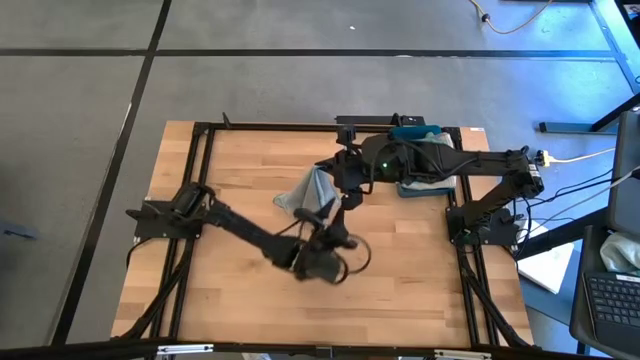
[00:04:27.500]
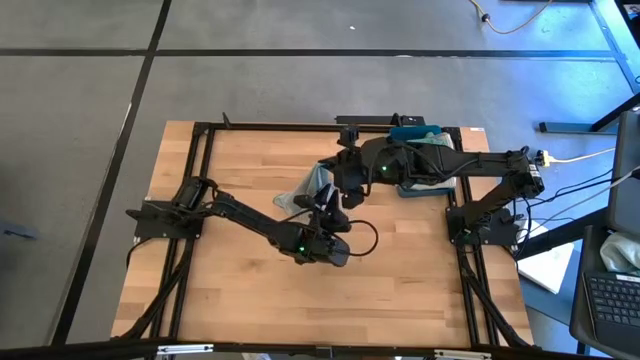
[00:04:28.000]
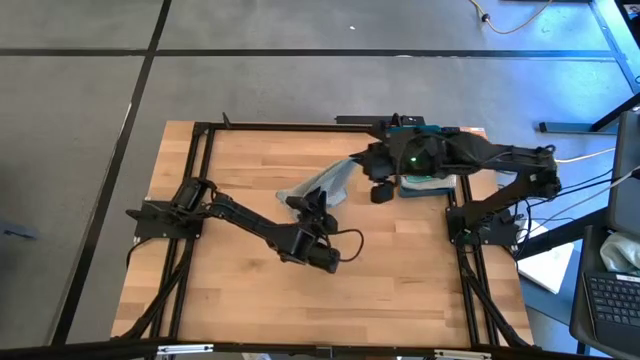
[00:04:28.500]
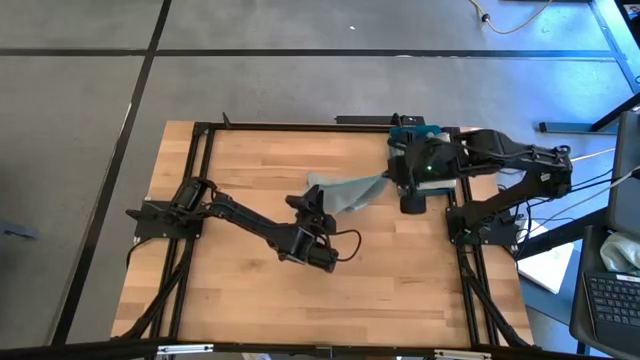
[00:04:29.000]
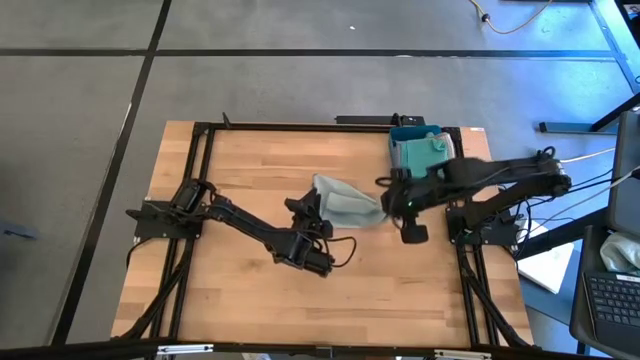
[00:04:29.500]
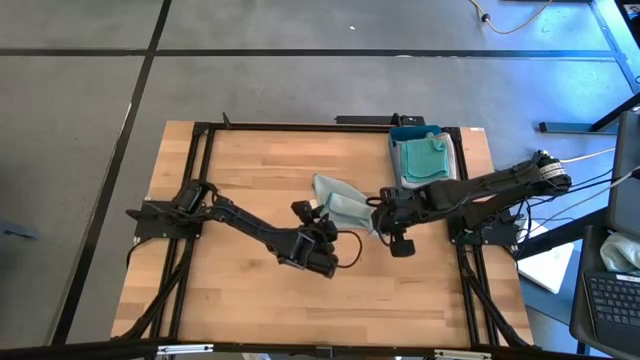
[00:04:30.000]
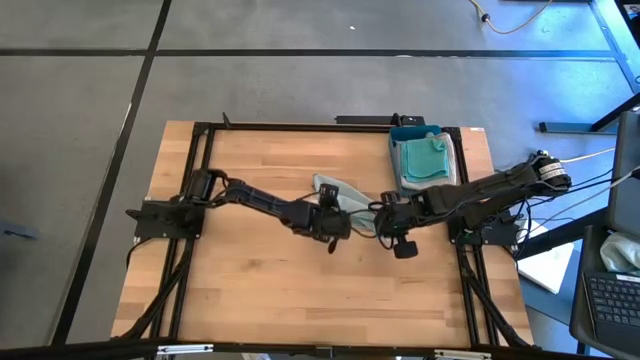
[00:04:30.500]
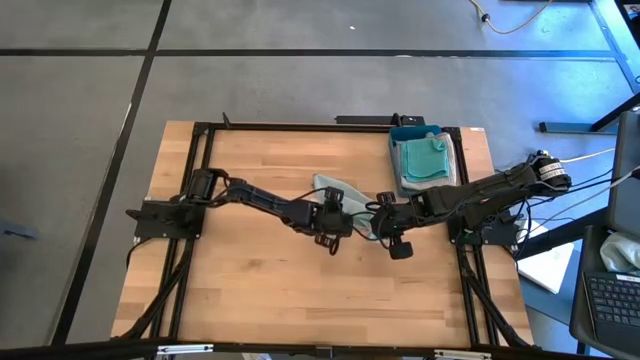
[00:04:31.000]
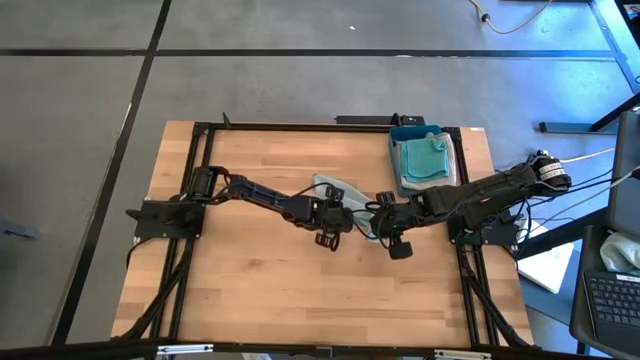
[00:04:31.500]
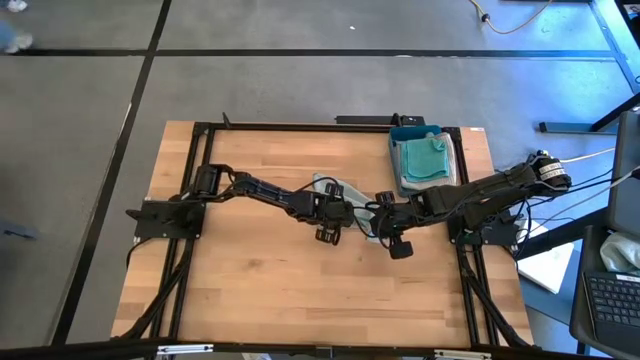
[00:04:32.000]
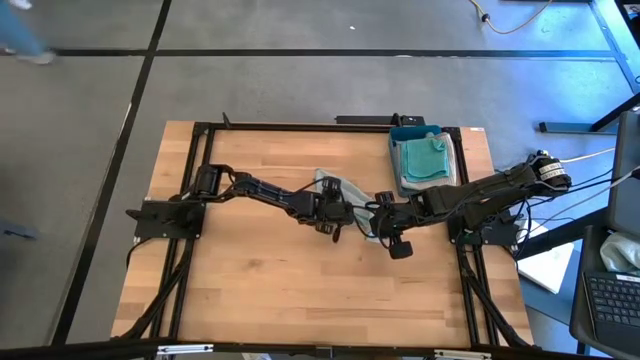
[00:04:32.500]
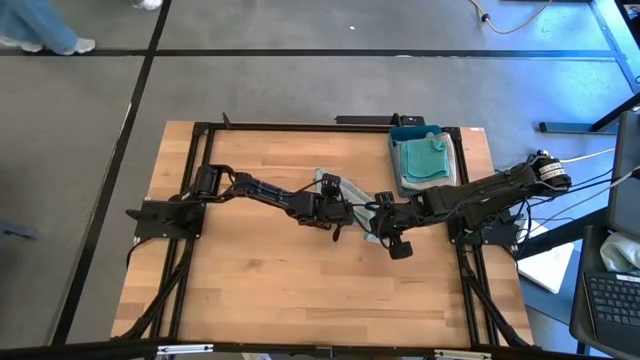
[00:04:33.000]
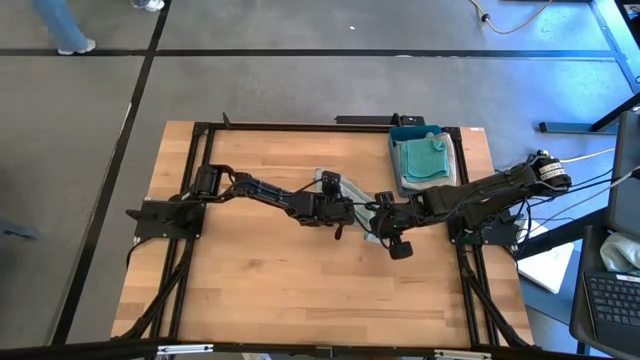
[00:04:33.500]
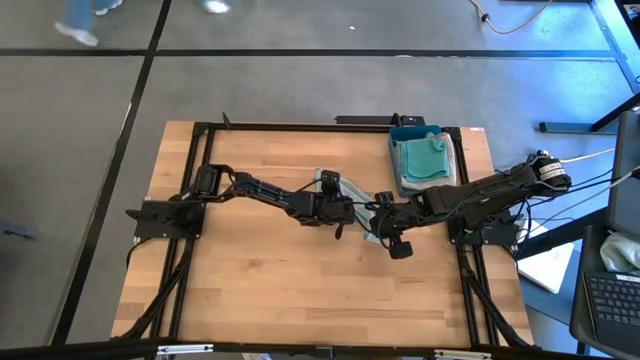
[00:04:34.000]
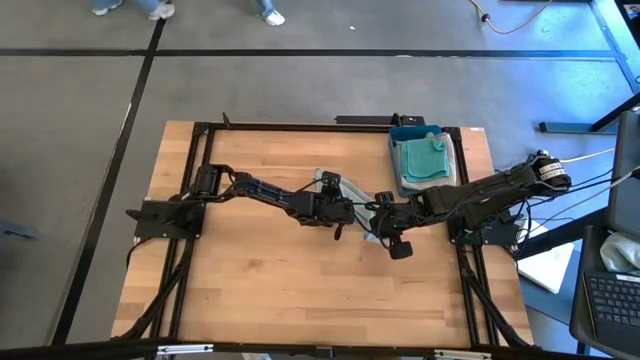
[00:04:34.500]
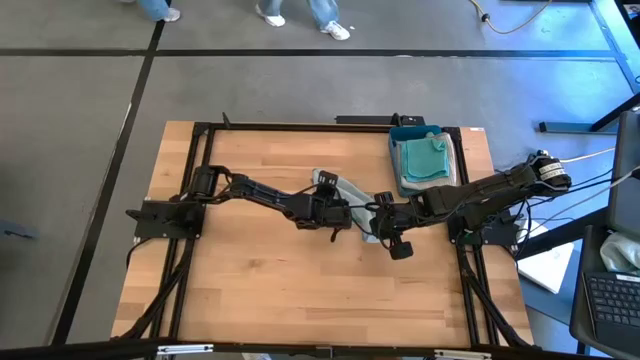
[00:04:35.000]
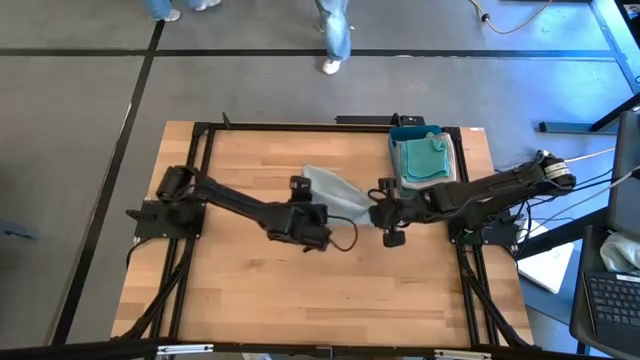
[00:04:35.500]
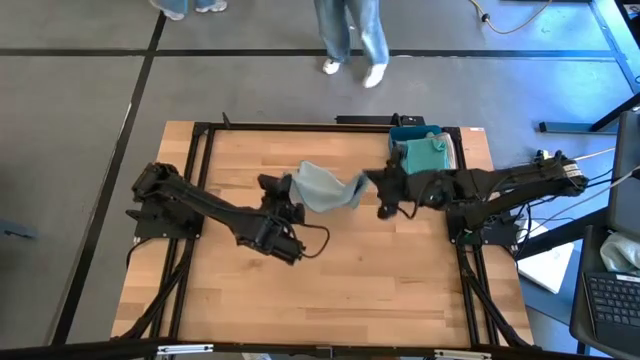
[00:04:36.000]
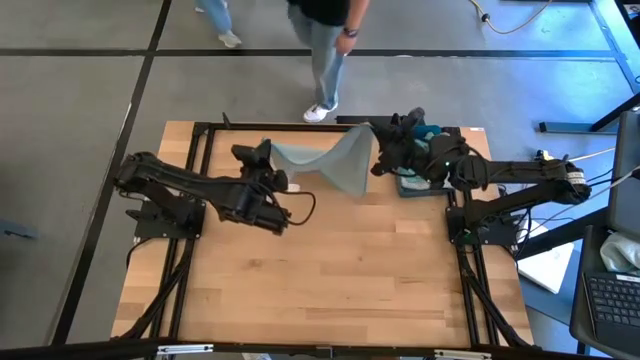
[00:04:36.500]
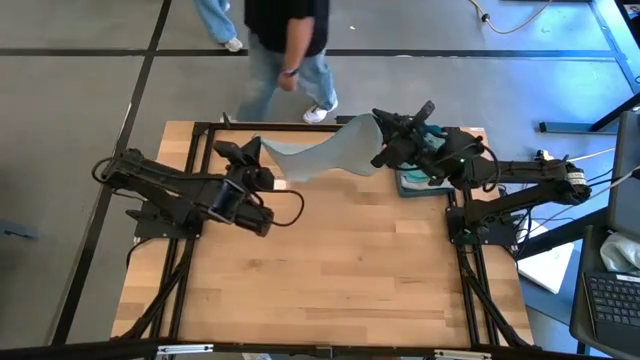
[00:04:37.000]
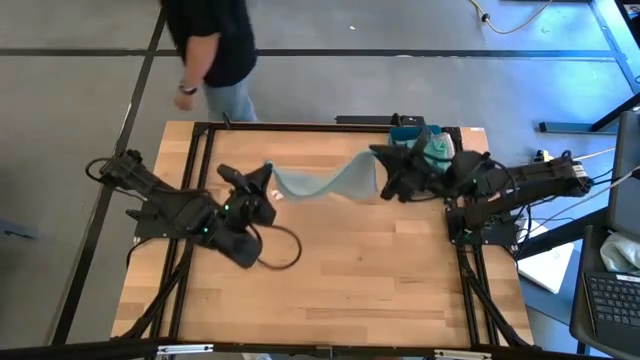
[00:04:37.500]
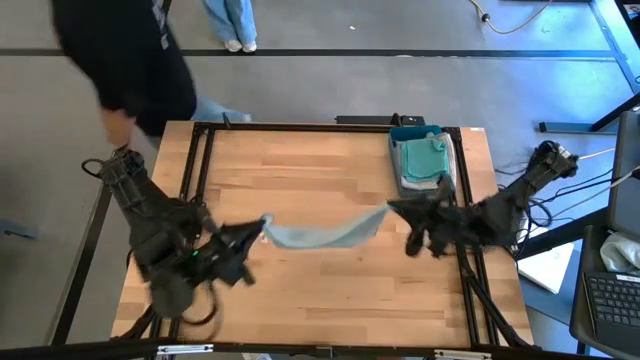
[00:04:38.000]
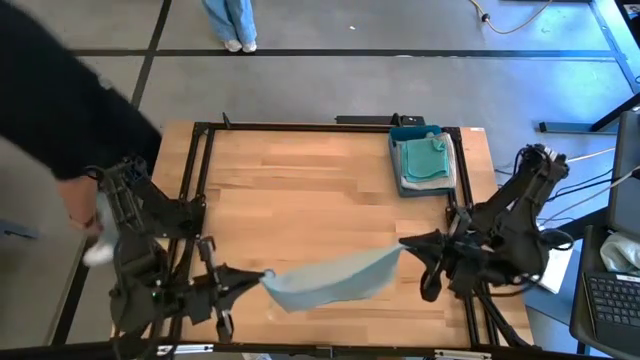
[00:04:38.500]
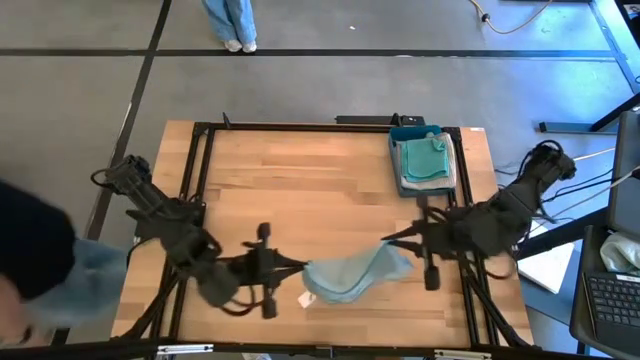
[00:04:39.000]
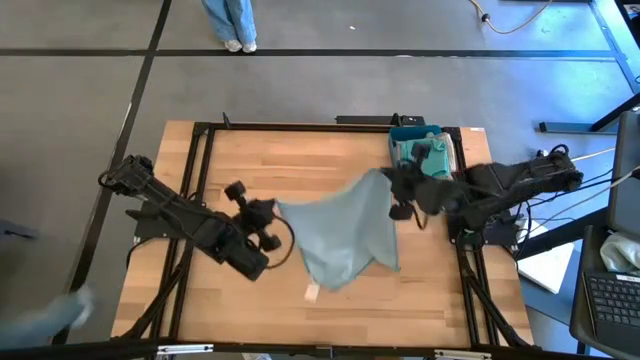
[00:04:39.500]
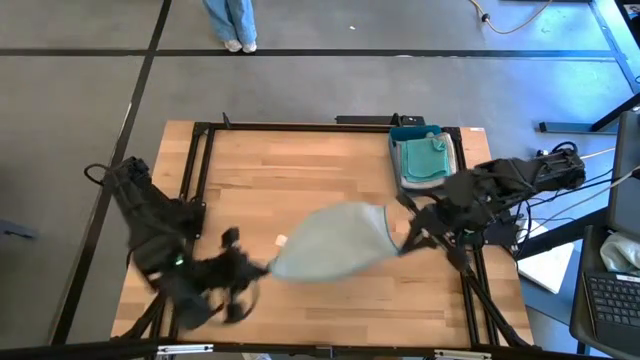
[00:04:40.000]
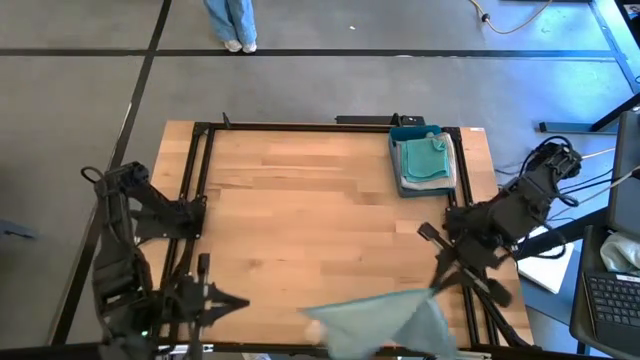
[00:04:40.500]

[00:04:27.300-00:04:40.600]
Task: Fold microfiber towels
Fold the light blue microfiber cloth

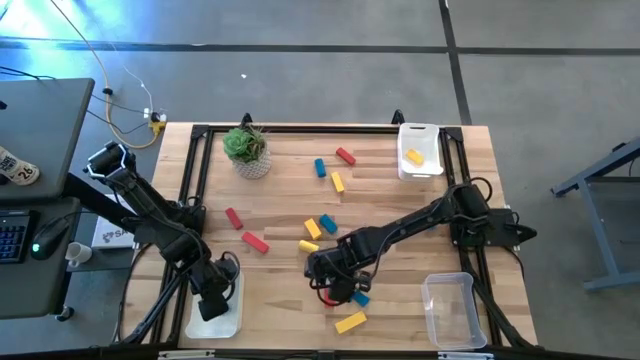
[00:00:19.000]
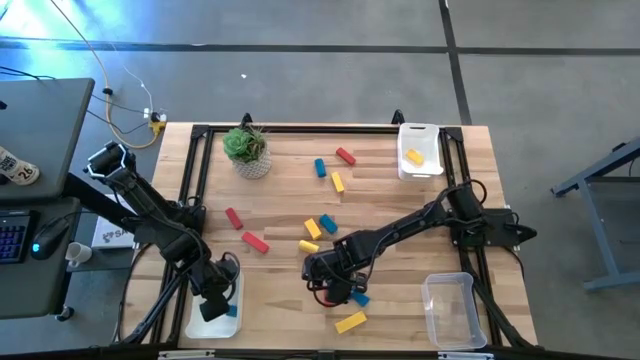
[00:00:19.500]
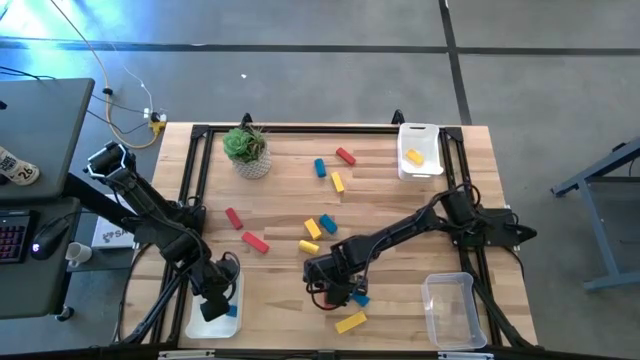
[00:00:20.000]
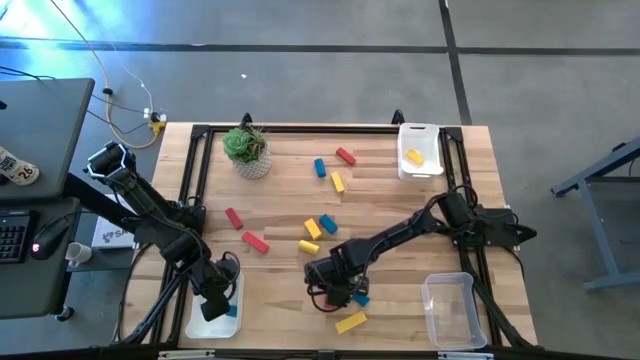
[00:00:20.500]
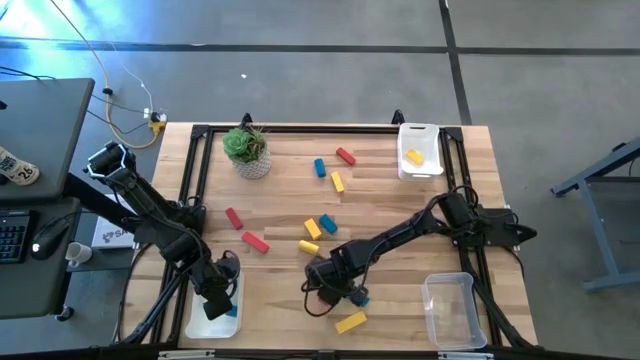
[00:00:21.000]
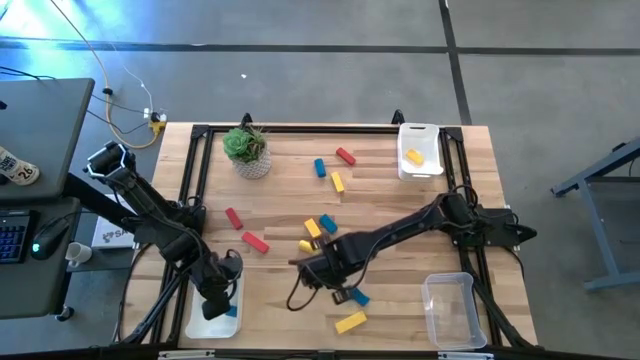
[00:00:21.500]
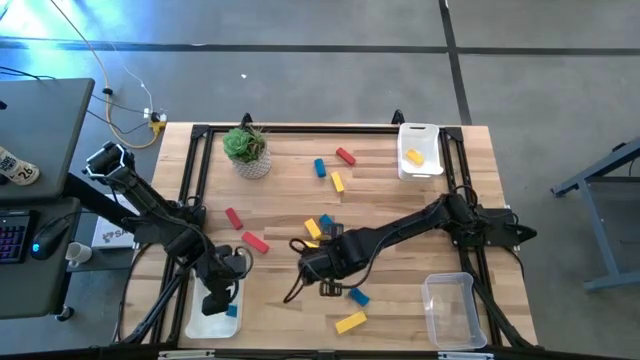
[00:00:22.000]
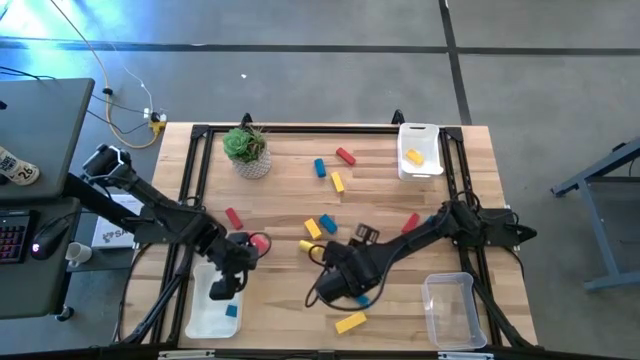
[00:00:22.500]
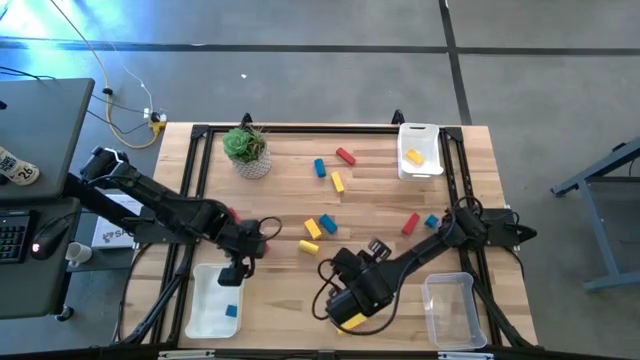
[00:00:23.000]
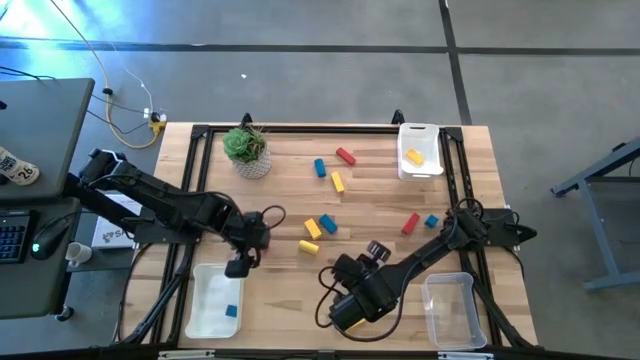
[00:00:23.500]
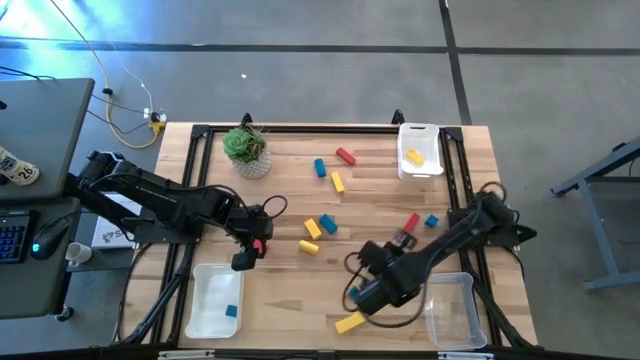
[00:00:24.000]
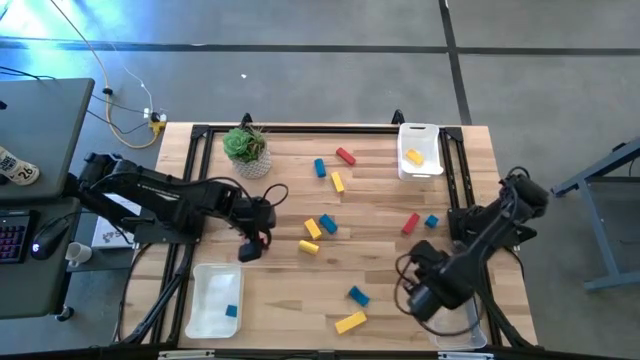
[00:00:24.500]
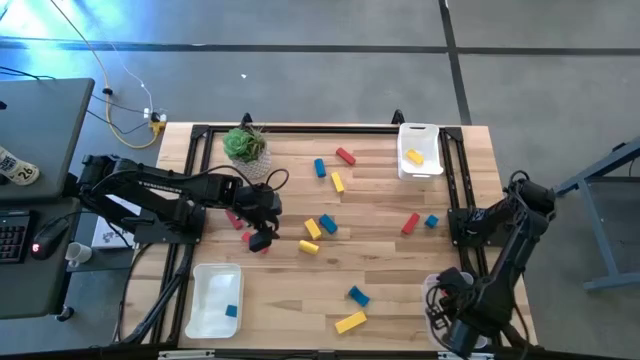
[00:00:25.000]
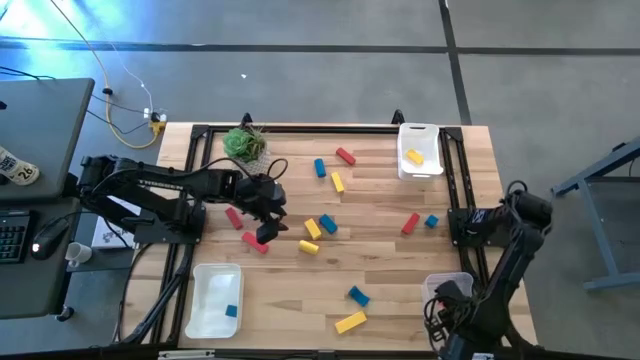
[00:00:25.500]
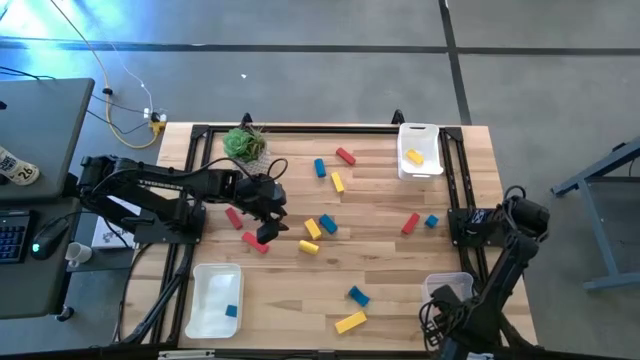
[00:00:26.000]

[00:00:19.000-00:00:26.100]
Task: Sort & place blocks by color
Put the red block into the transparent bin
